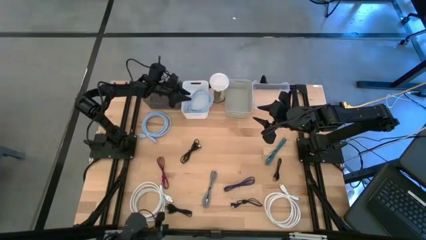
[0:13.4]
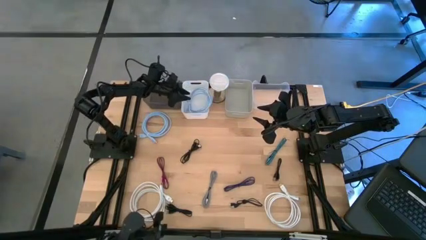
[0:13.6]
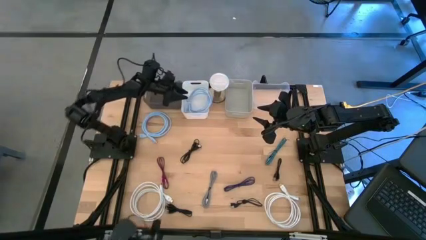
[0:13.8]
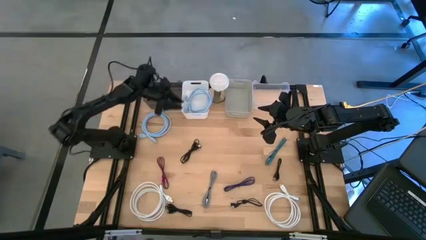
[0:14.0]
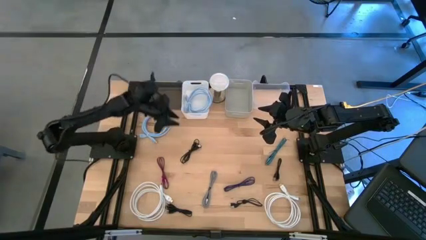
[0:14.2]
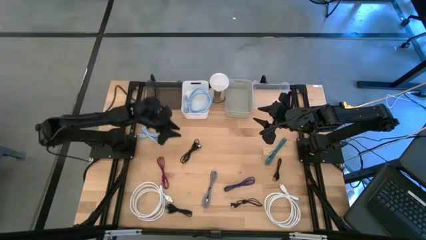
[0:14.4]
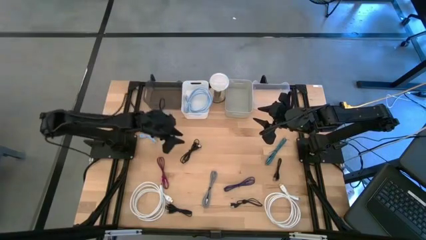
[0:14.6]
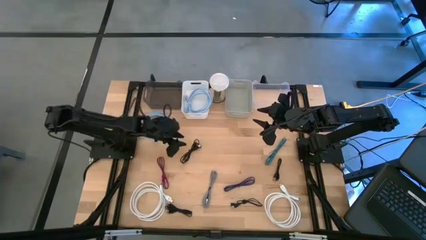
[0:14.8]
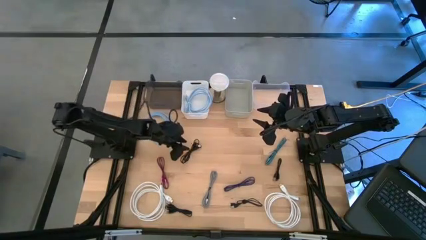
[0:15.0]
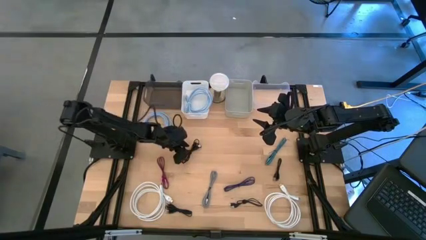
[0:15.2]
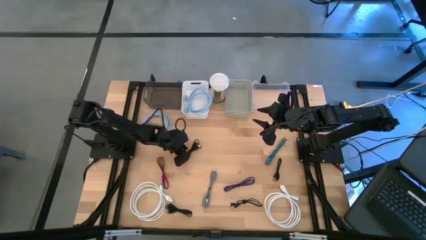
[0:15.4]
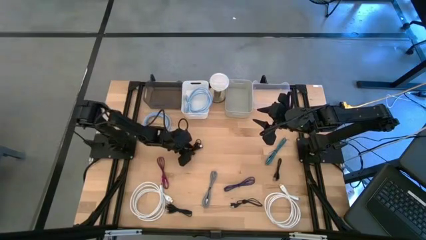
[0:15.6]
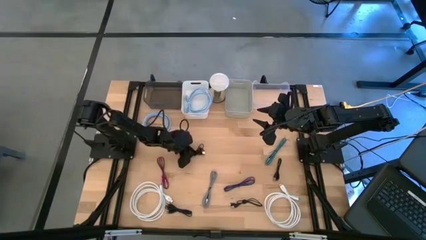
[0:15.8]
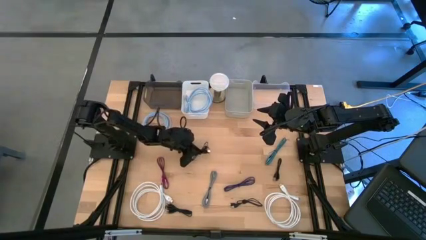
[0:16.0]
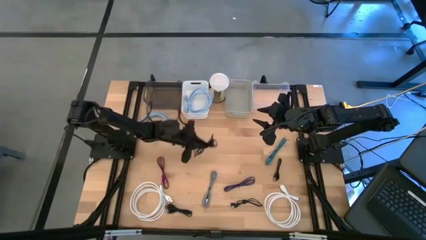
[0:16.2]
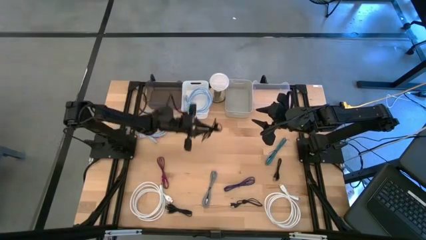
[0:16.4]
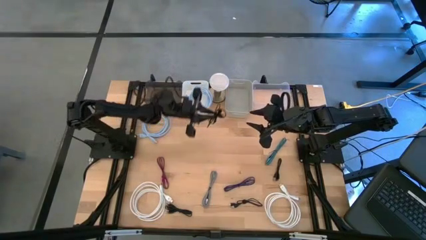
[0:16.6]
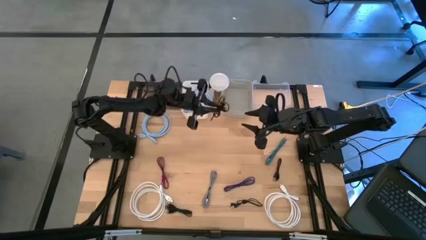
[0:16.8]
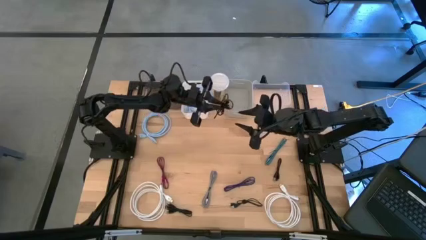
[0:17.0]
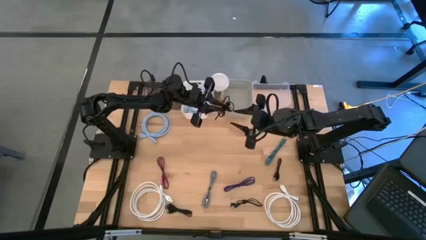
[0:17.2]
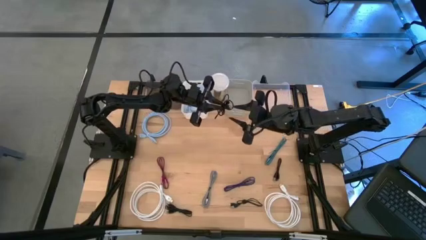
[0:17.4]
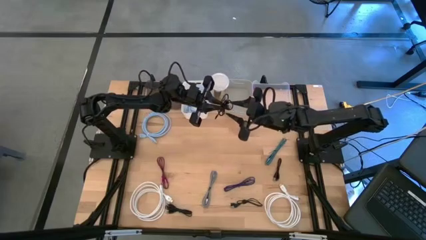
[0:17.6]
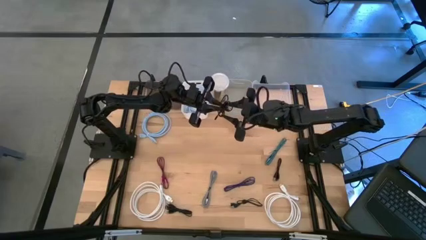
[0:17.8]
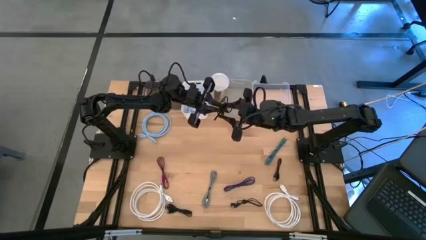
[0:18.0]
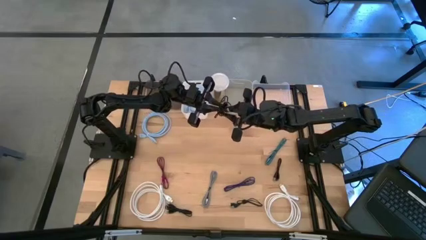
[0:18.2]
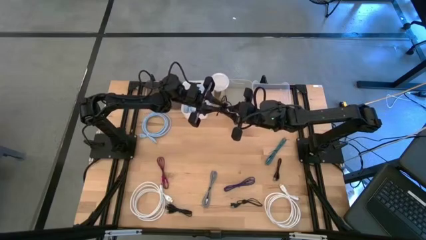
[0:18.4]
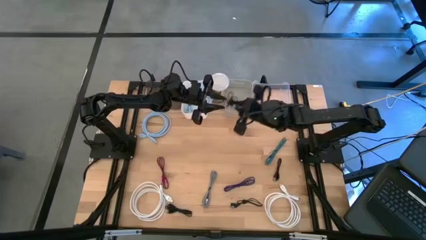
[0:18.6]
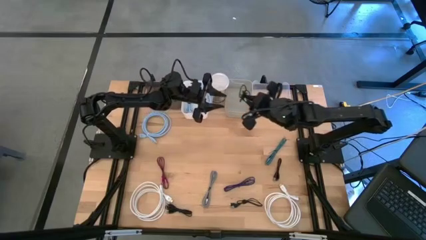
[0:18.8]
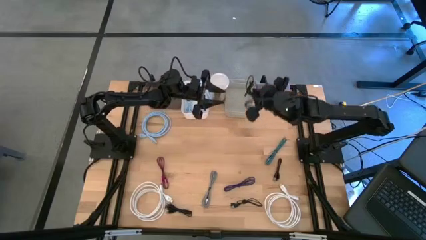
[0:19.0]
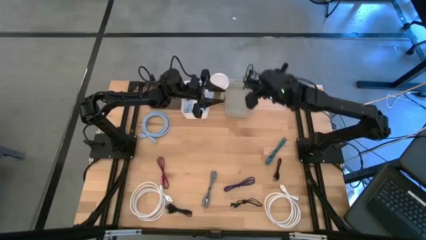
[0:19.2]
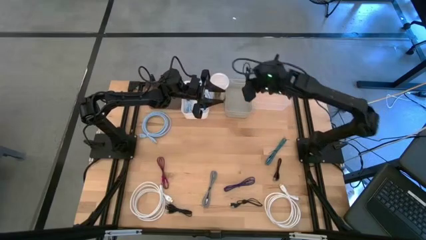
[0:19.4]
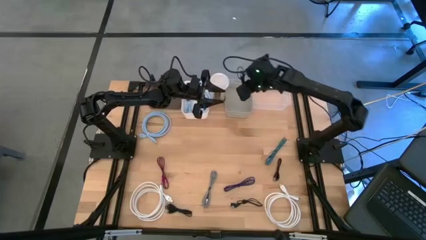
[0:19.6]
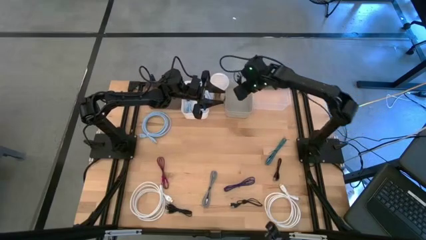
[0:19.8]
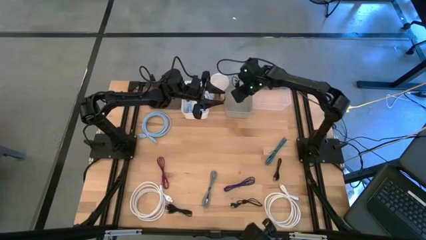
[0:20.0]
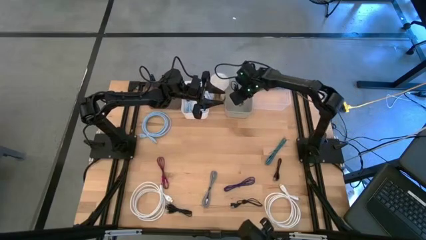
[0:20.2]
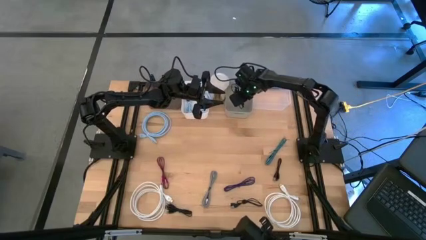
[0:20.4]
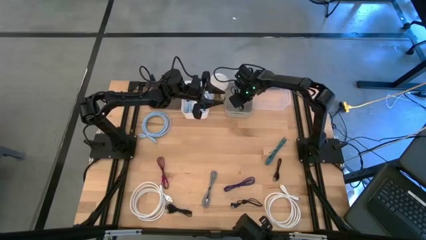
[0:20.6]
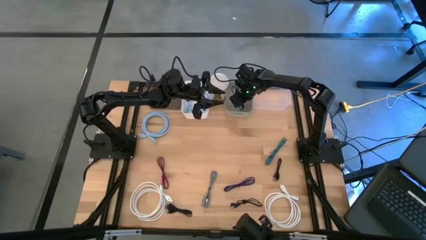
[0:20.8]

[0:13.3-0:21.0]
Task: Pick & Place USB Port
Put the black charger cable into the gray bin

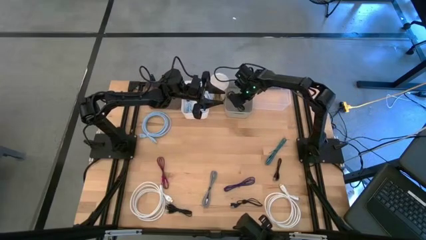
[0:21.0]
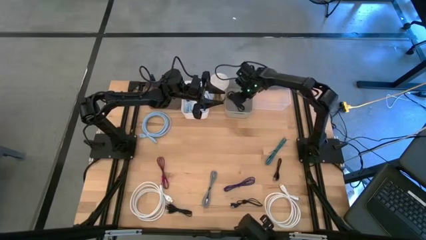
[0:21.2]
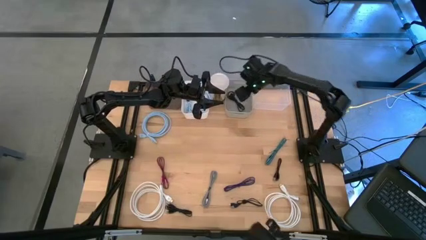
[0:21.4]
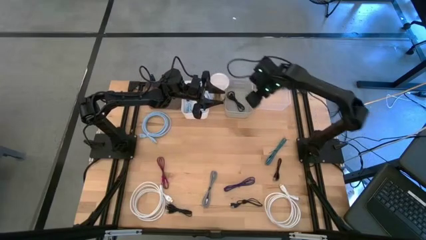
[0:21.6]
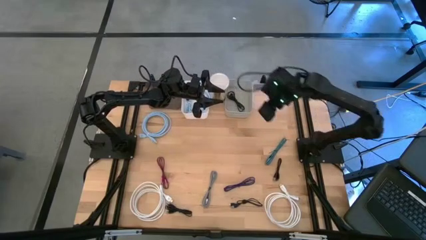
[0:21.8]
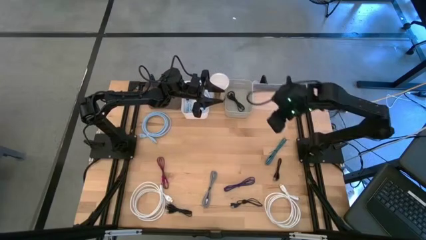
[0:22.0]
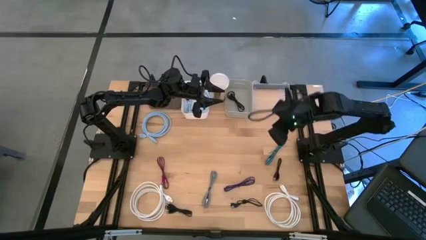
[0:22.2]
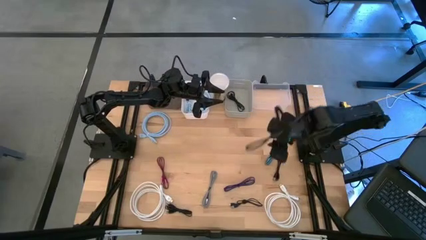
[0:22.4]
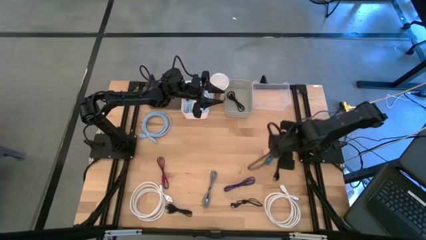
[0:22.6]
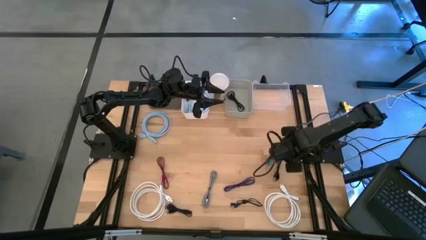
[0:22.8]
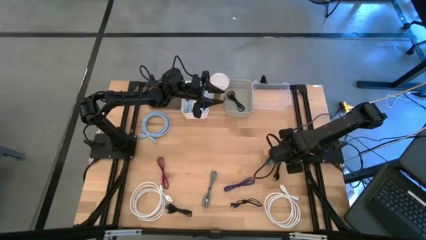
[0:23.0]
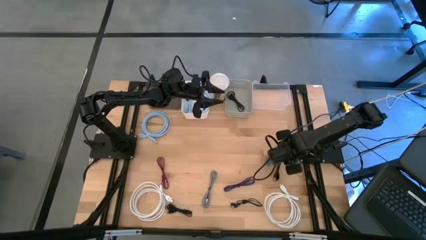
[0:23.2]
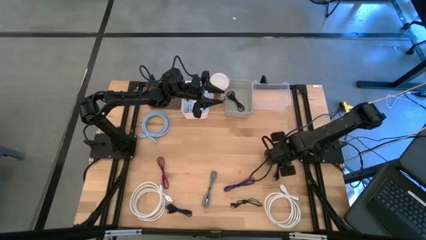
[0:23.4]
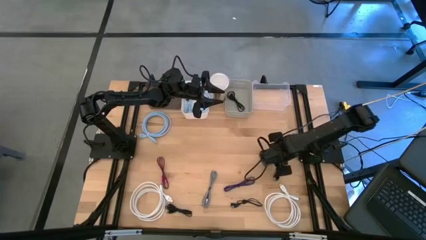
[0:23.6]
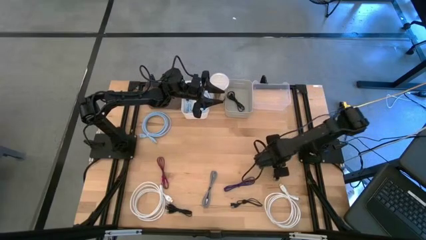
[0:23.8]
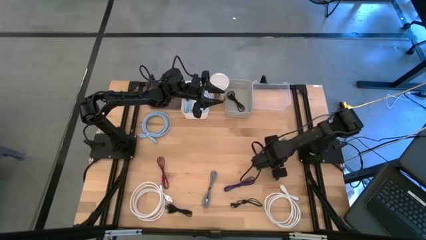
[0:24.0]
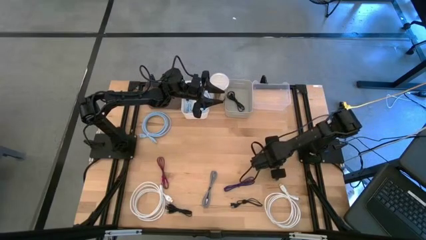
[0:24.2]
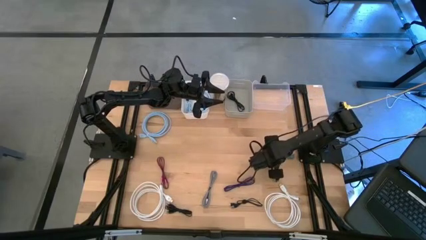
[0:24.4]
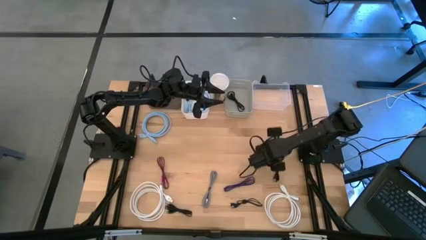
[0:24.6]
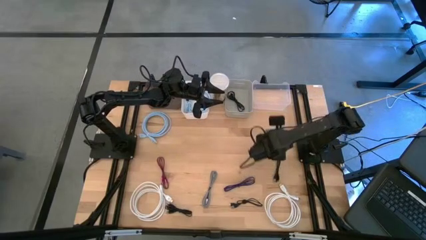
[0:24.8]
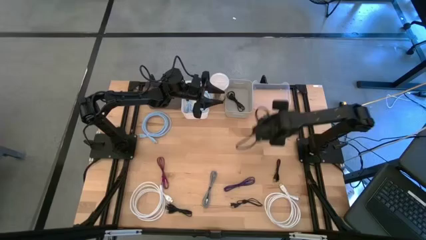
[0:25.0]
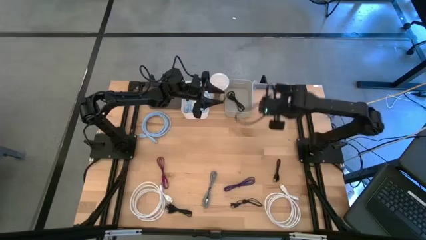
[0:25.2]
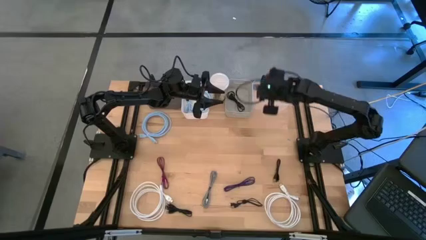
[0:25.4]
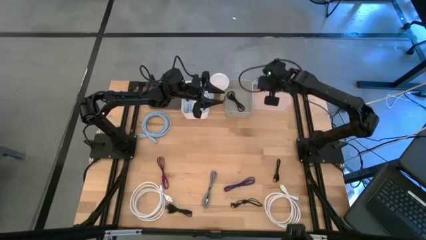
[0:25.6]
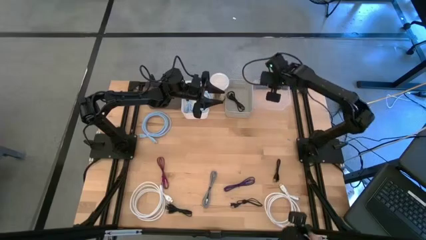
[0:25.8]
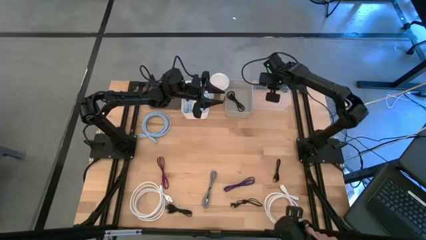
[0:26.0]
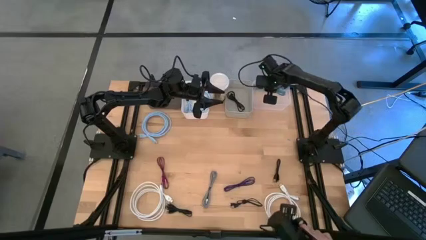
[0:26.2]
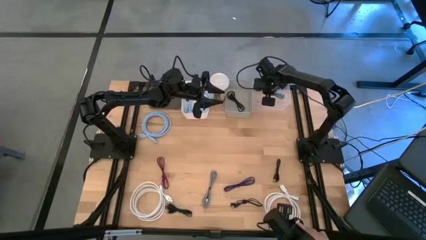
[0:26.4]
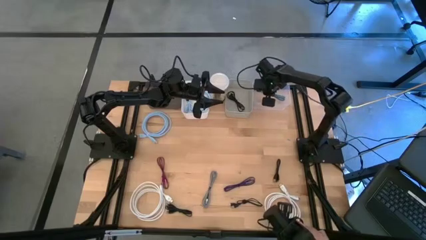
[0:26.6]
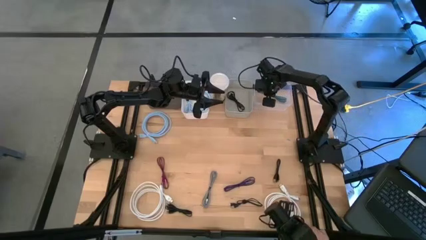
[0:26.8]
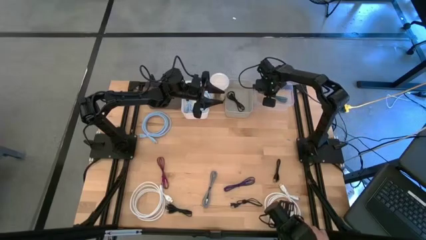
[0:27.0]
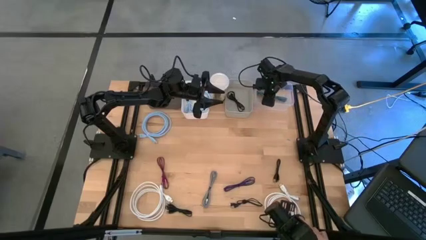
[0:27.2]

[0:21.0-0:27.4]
Put the blue charger cable into the transparent bin
